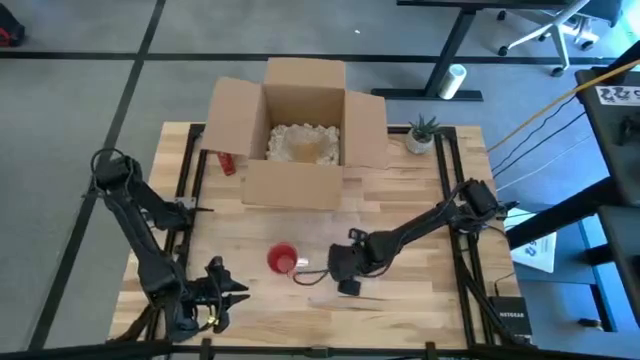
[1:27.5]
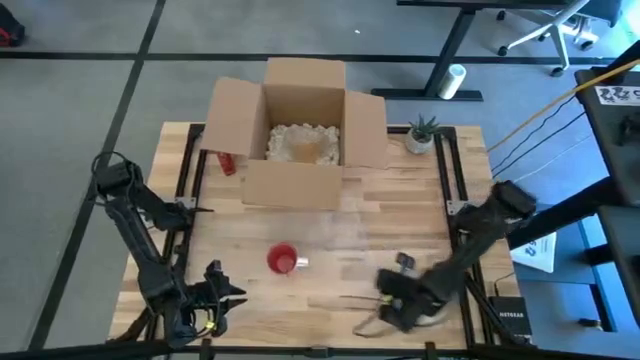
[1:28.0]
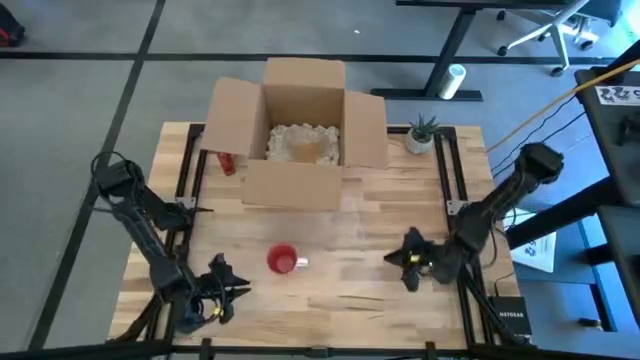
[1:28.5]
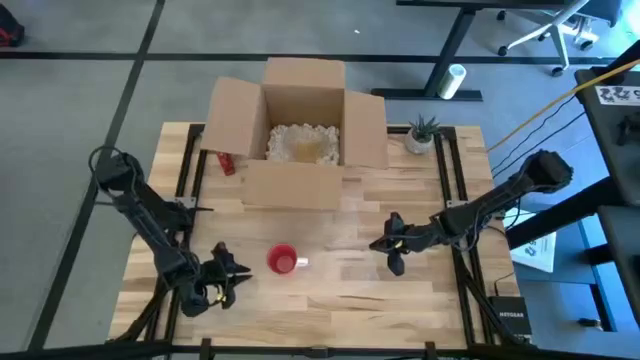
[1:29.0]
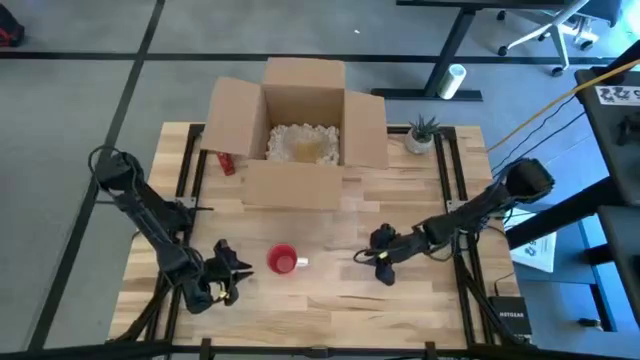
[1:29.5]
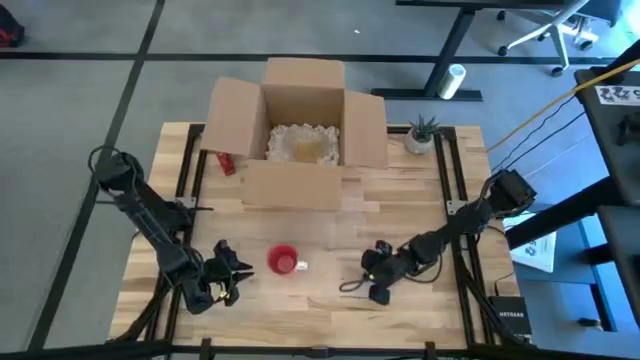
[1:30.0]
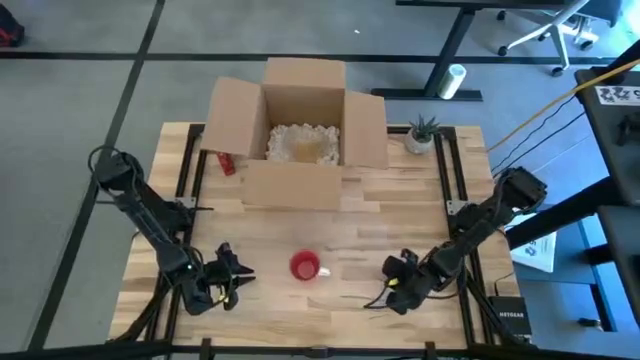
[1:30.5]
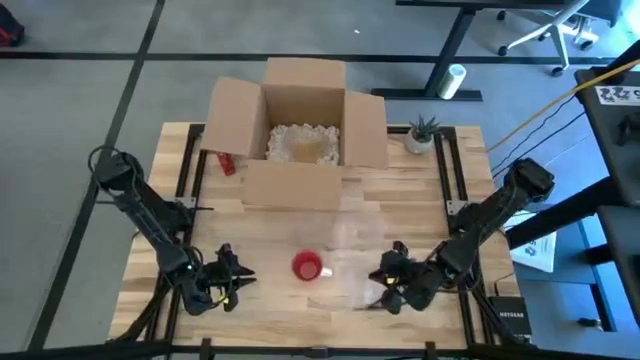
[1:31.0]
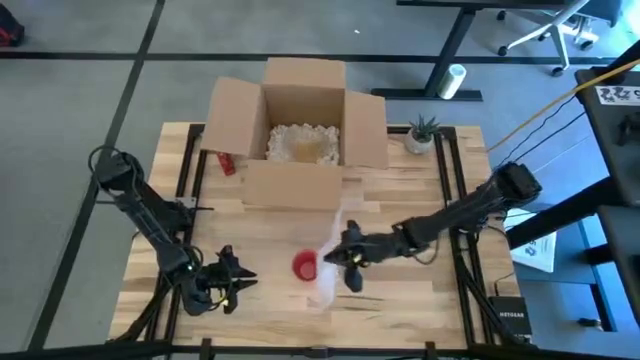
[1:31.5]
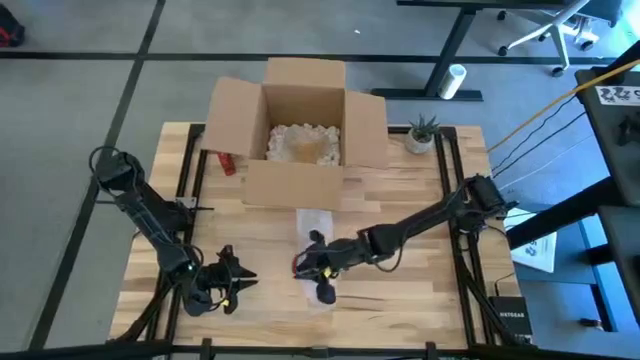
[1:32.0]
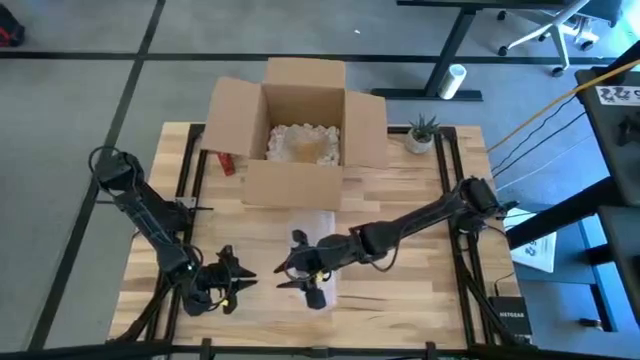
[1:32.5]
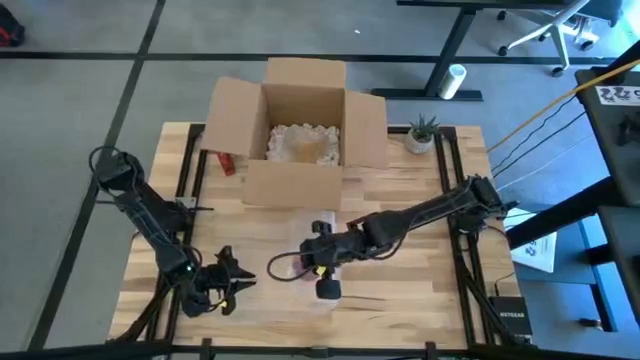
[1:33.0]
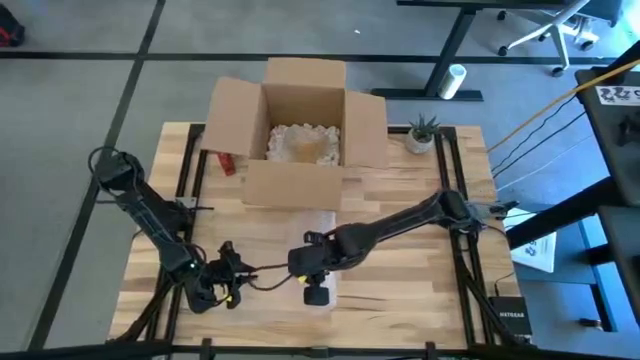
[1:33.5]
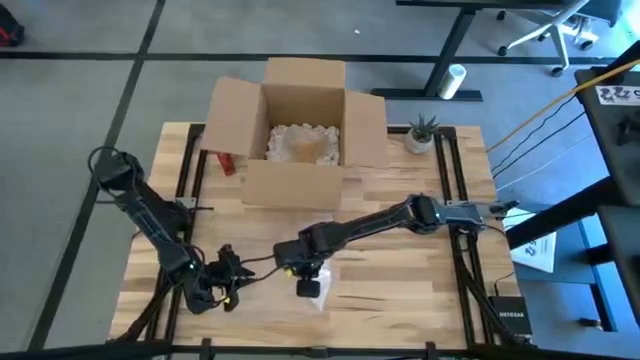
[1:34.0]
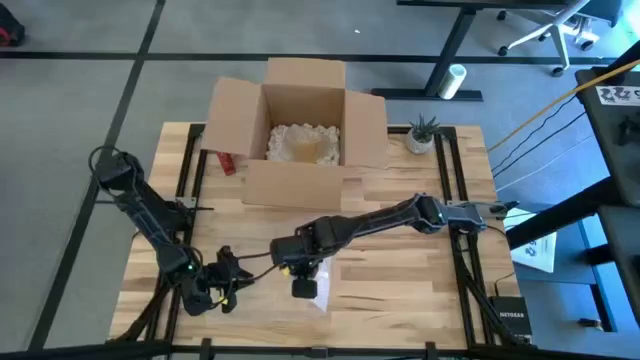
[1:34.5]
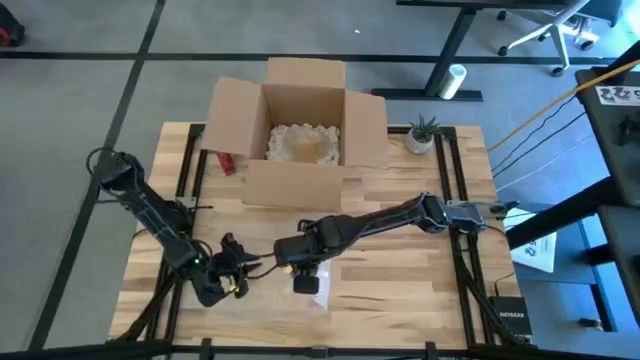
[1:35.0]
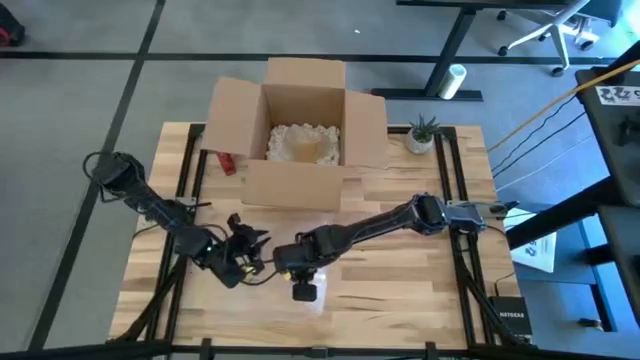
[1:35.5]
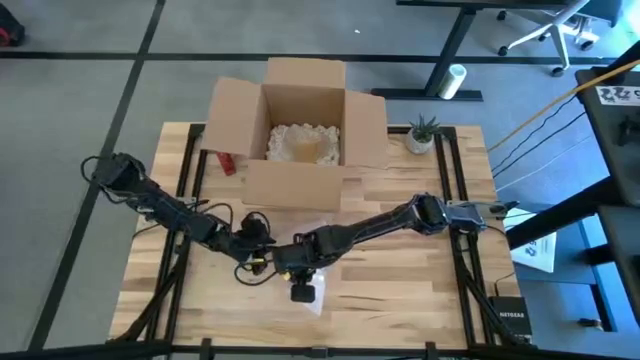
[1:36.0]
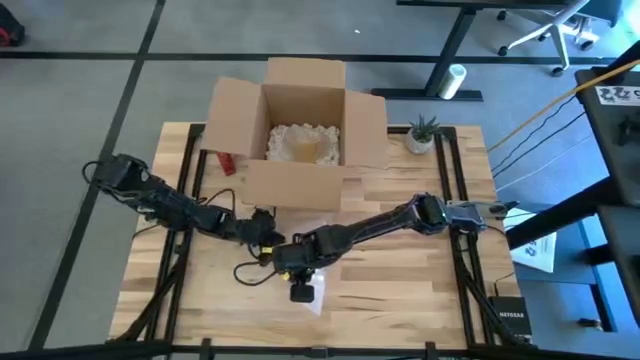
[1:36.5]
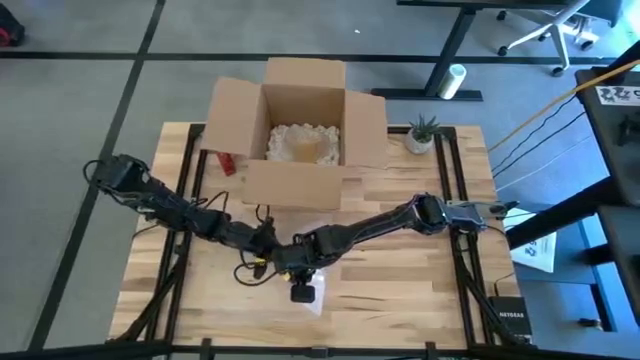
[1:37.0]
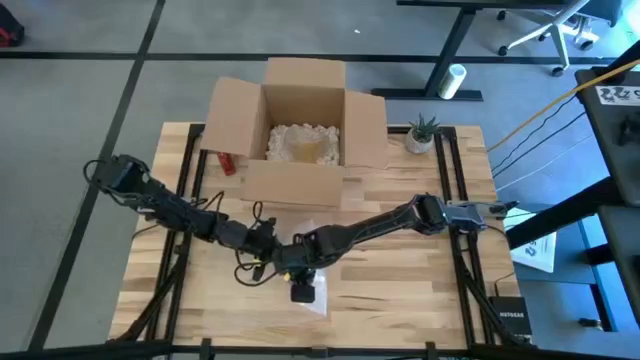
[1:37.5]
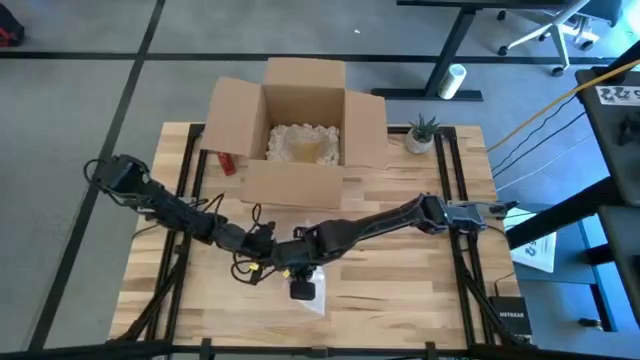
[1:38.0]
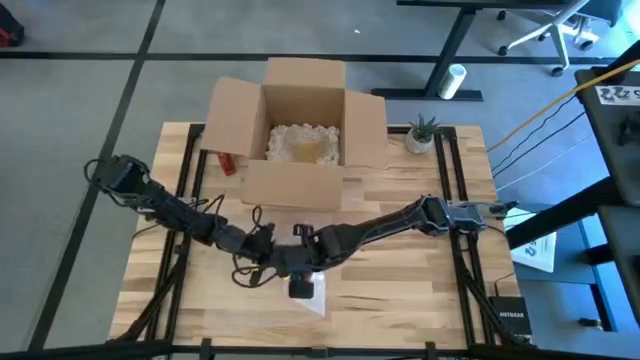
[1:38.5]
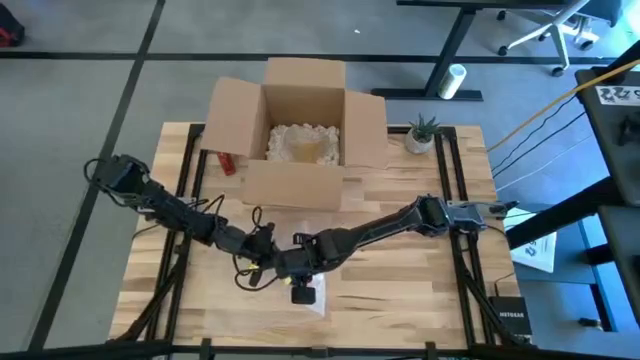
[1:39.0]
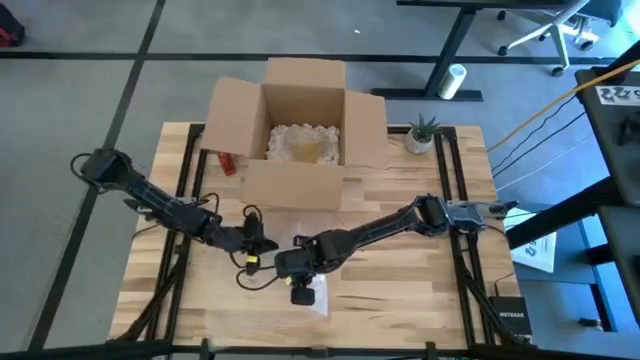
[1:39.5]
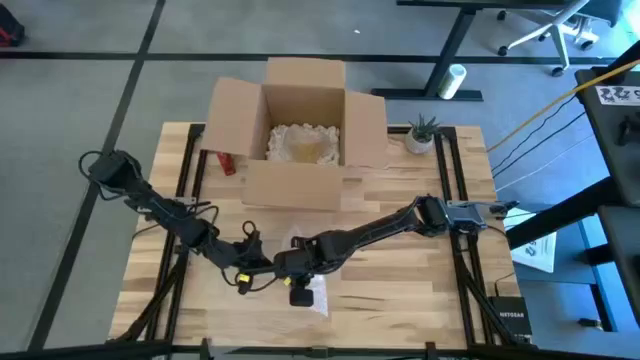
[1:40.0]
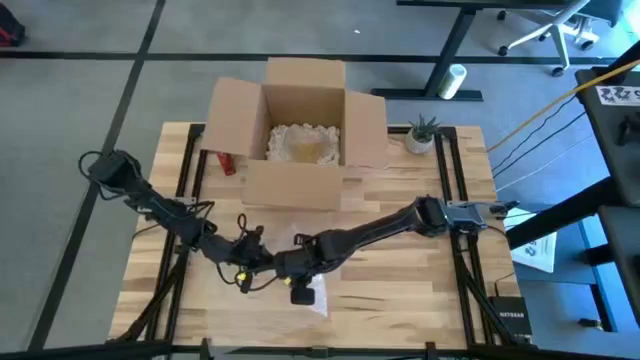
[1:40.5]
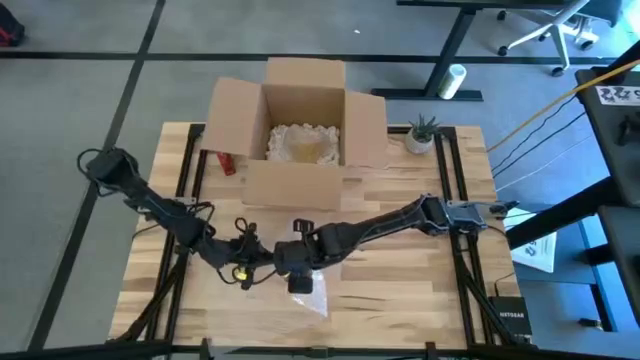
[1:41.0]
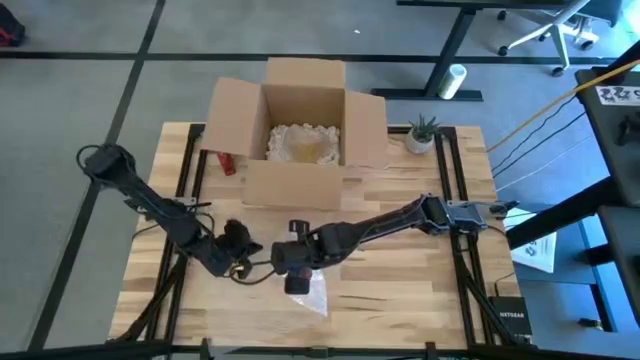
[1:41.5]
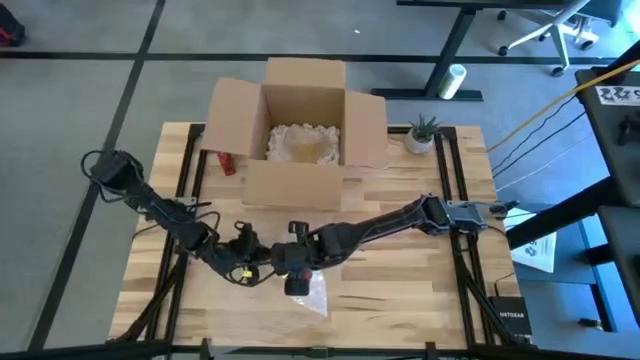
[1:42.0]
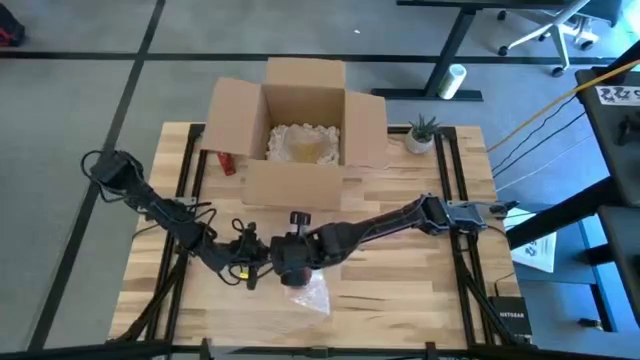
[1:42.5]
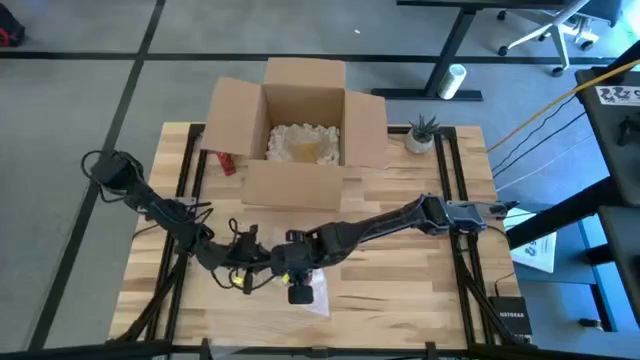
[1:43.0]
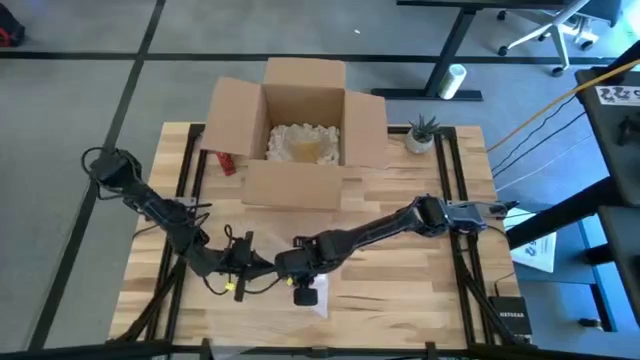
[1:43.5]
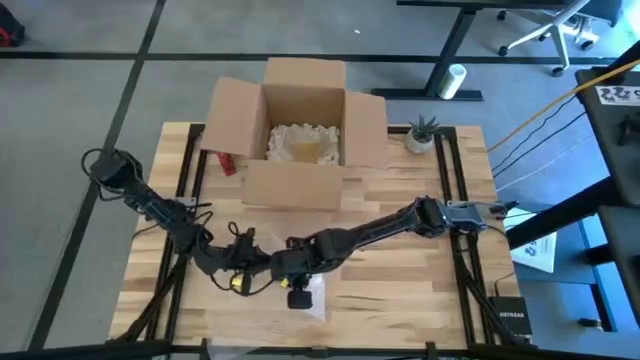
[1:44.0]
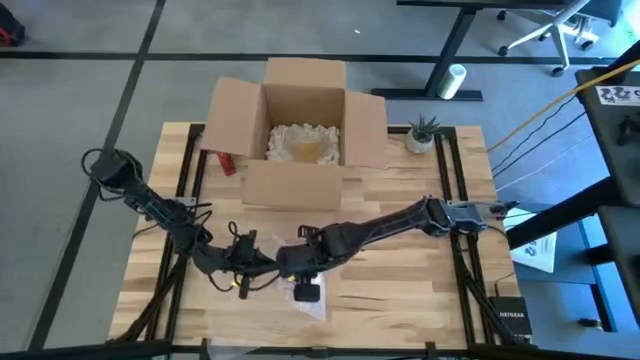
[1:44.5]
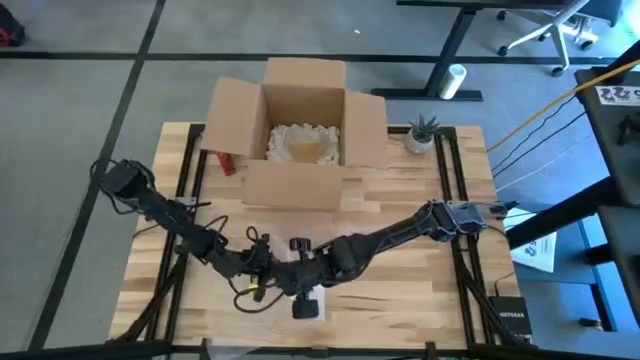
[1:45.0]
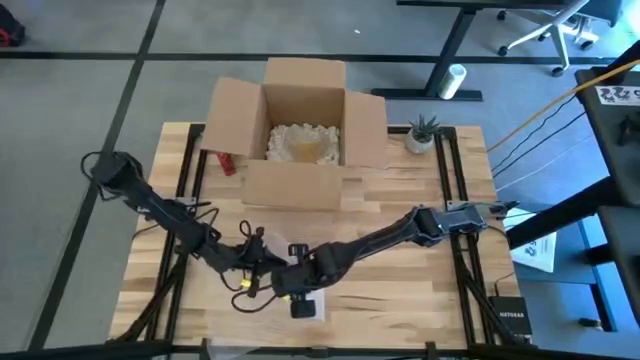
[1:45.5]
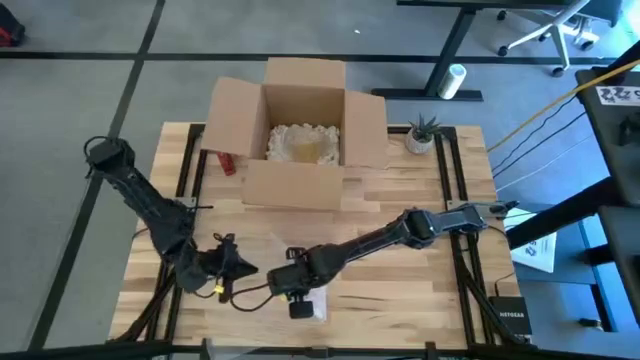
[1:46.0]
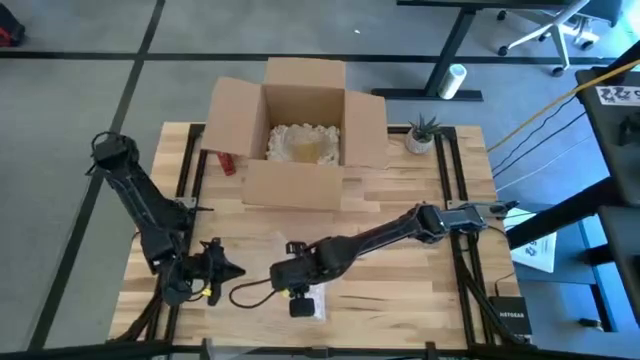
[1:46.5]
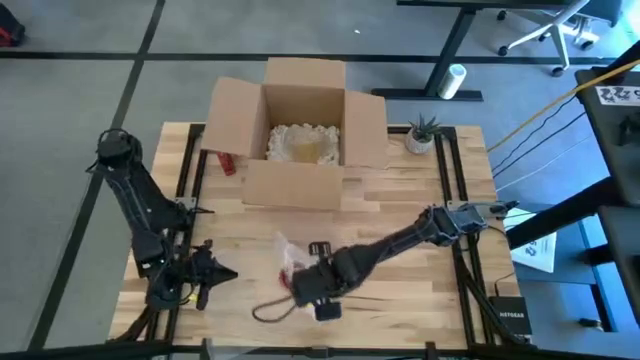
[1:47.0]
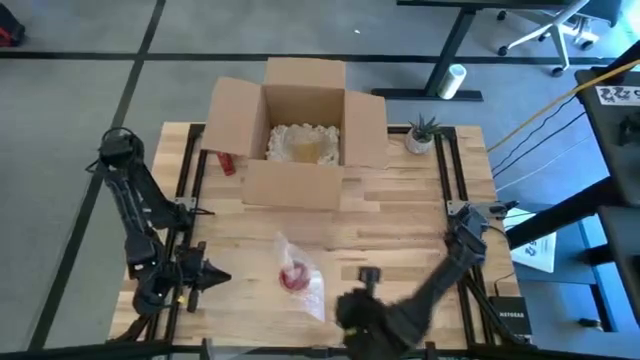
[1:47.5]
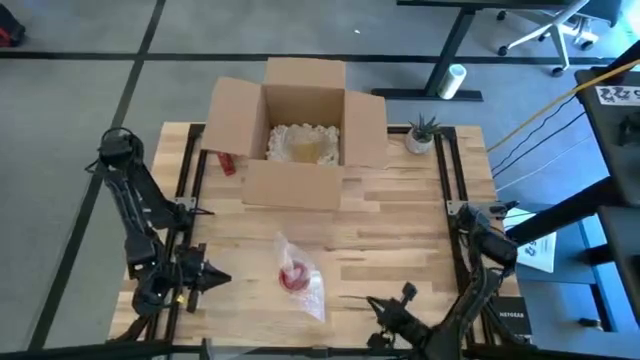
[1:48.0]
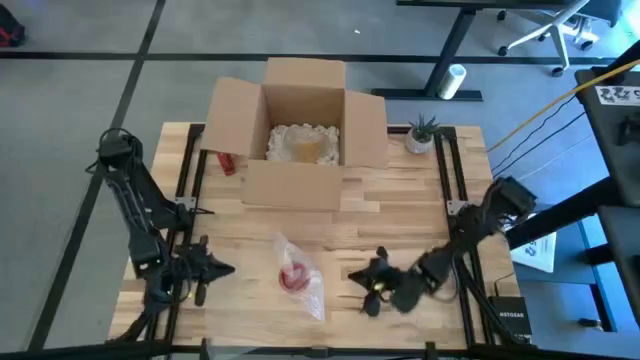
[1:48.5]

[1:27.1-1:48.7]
Task: wrap mug
Wrap the red mug with bubble wrap
